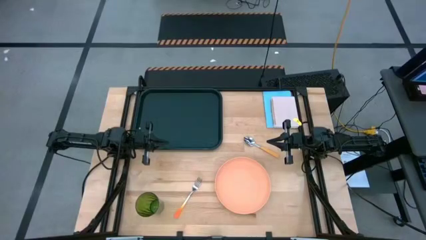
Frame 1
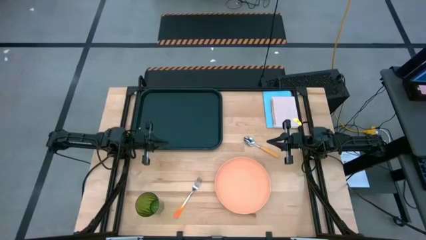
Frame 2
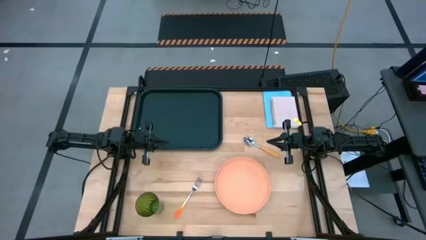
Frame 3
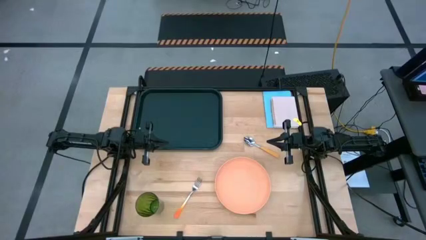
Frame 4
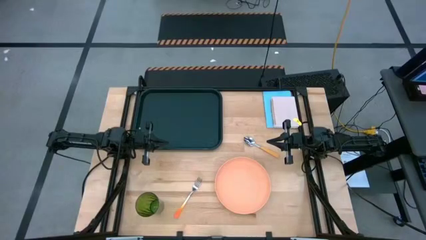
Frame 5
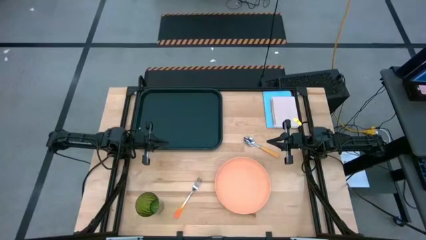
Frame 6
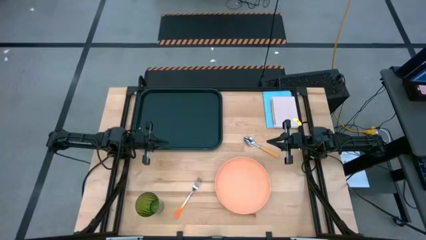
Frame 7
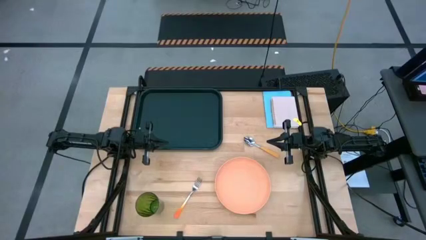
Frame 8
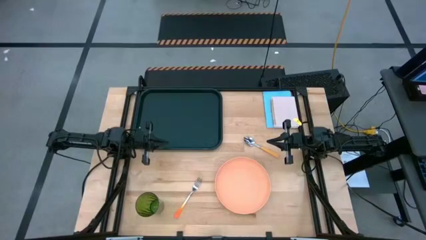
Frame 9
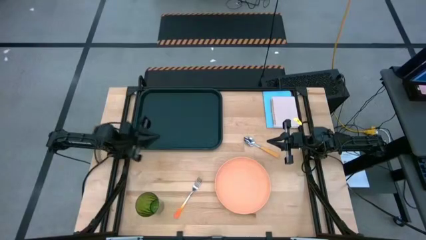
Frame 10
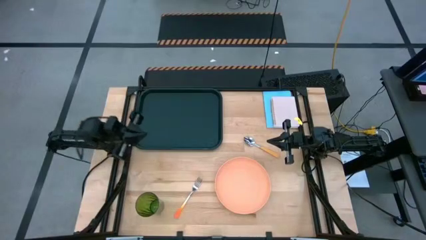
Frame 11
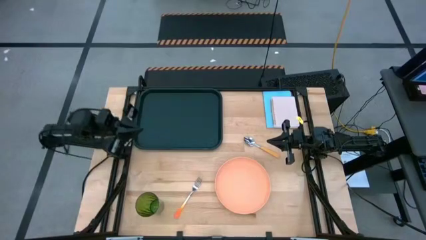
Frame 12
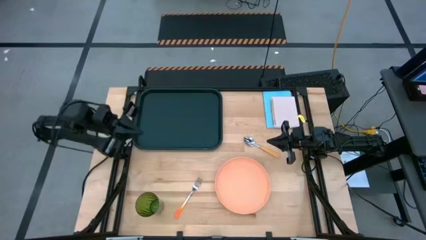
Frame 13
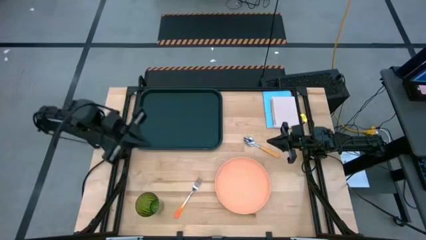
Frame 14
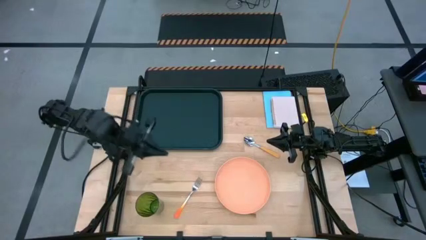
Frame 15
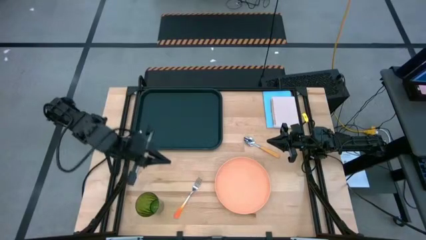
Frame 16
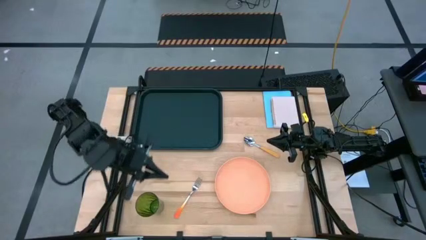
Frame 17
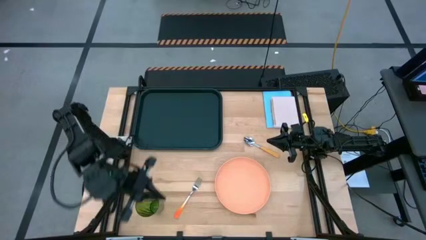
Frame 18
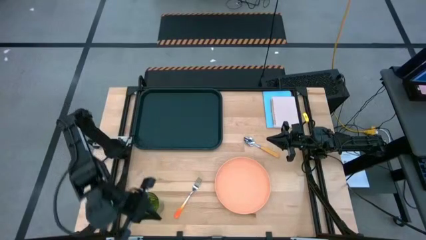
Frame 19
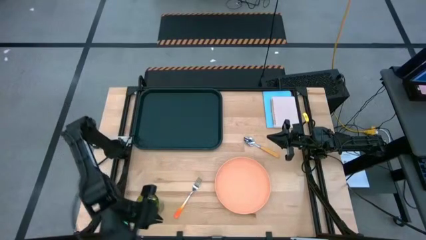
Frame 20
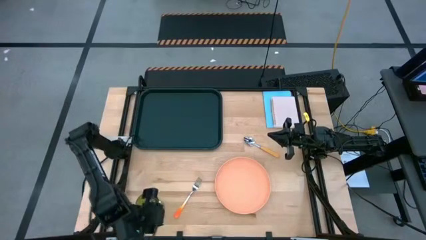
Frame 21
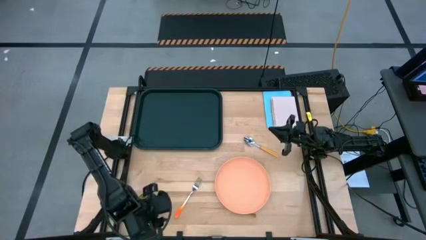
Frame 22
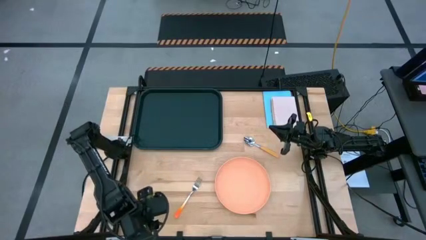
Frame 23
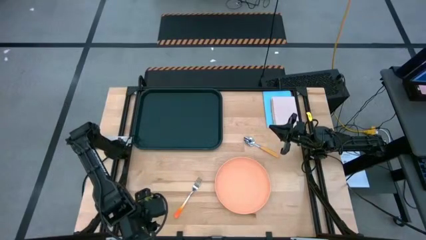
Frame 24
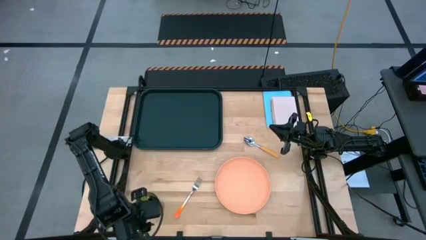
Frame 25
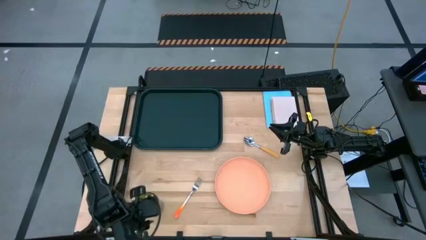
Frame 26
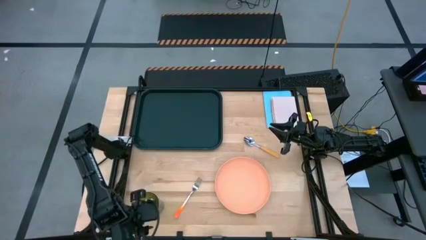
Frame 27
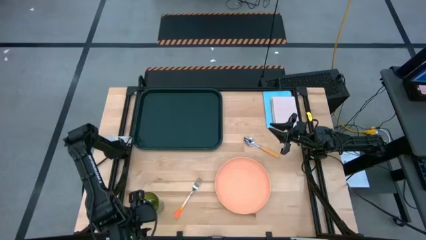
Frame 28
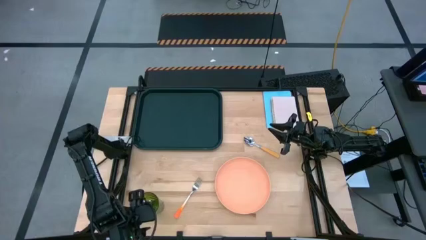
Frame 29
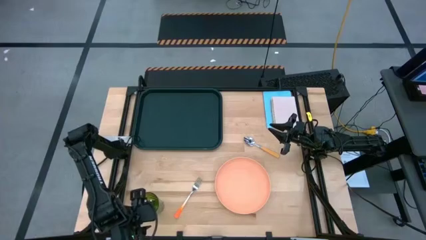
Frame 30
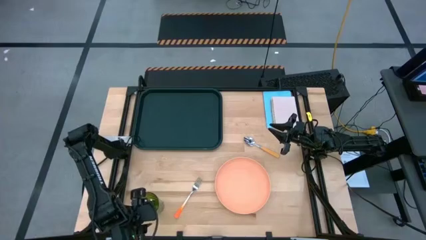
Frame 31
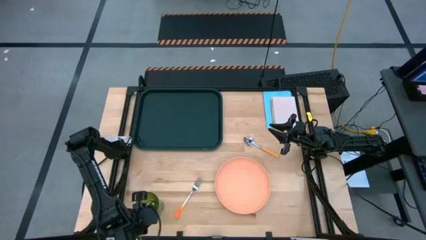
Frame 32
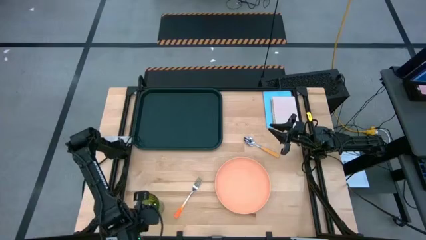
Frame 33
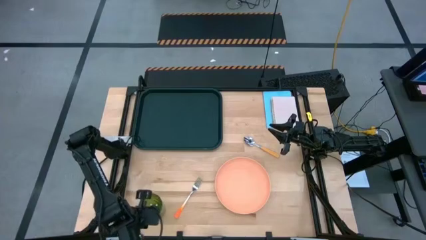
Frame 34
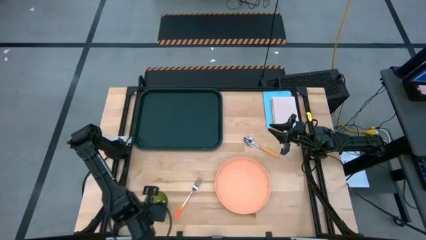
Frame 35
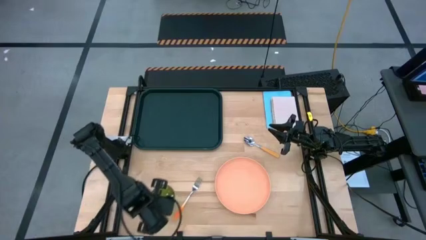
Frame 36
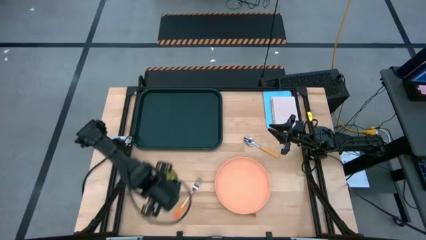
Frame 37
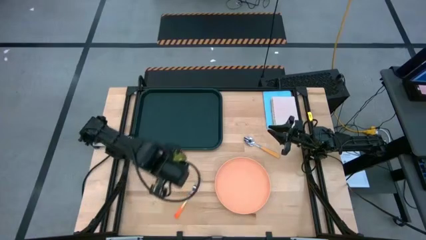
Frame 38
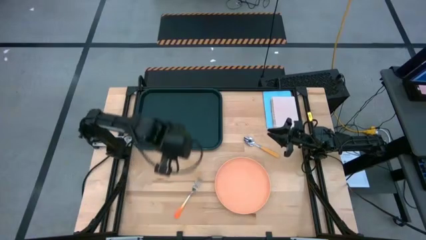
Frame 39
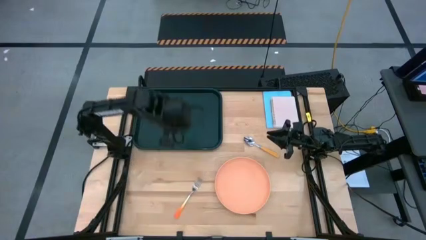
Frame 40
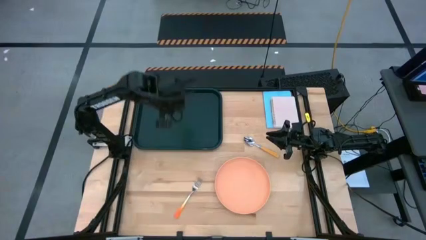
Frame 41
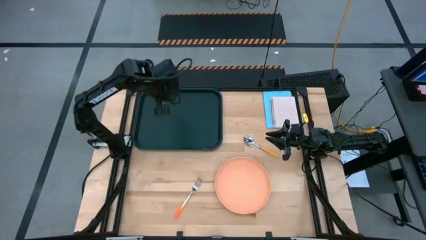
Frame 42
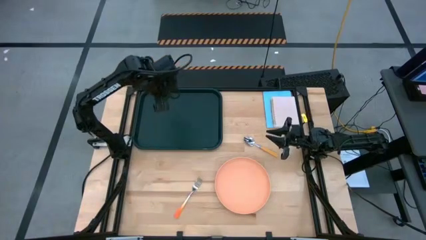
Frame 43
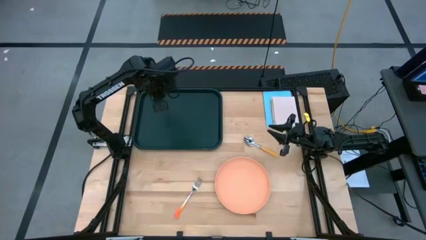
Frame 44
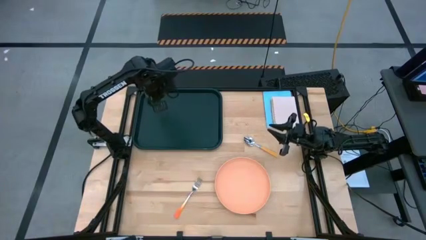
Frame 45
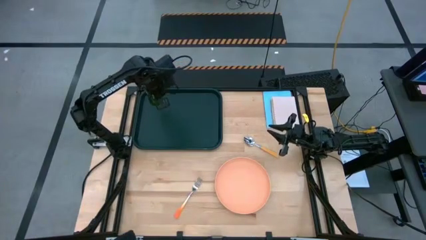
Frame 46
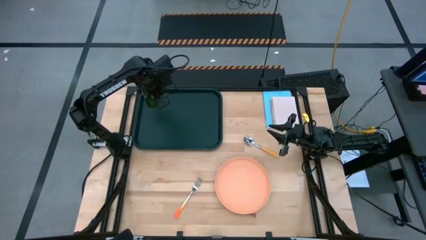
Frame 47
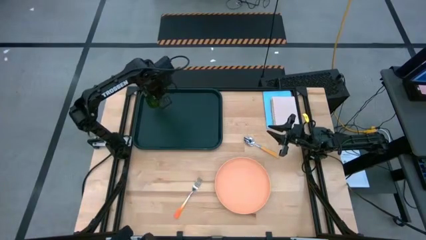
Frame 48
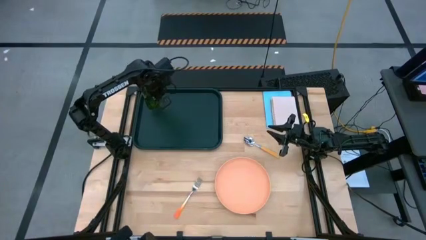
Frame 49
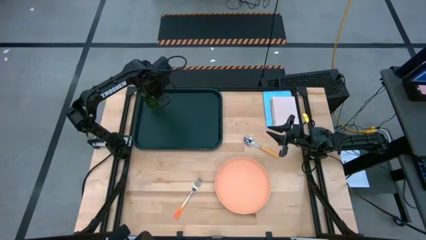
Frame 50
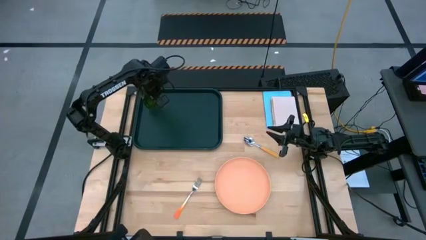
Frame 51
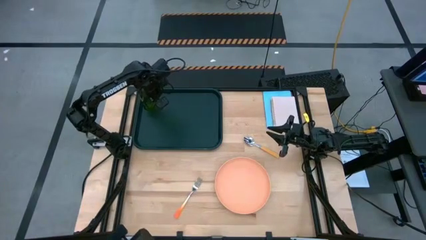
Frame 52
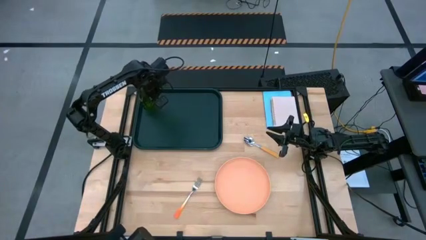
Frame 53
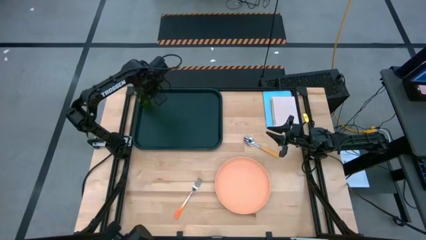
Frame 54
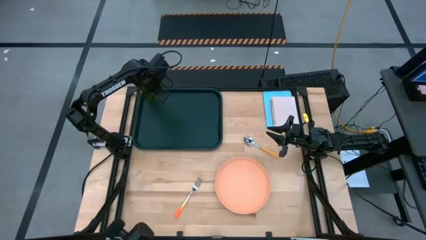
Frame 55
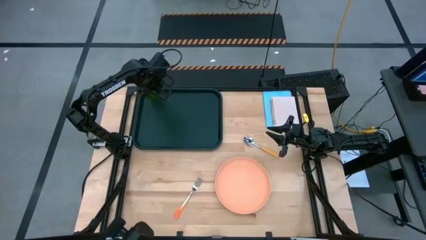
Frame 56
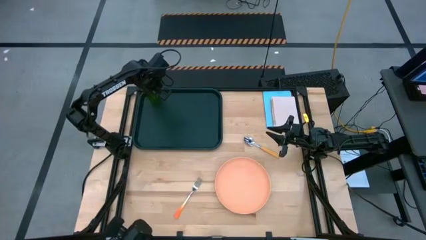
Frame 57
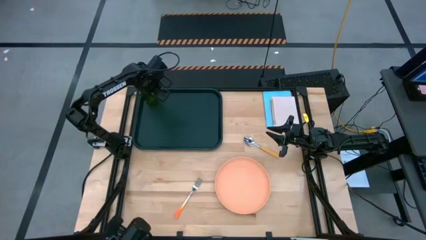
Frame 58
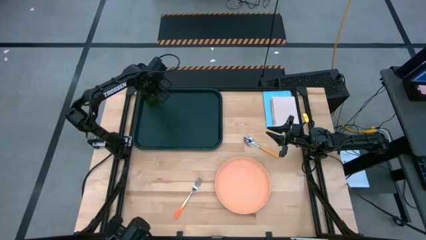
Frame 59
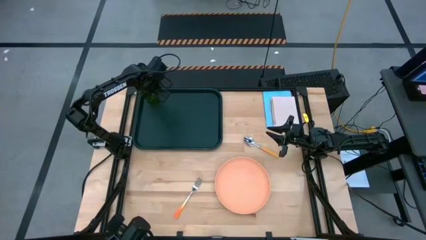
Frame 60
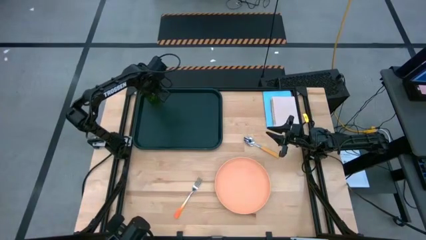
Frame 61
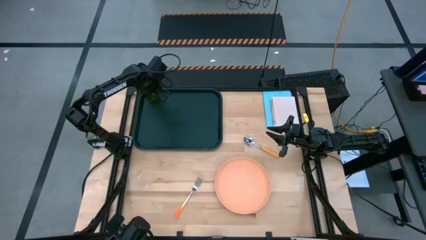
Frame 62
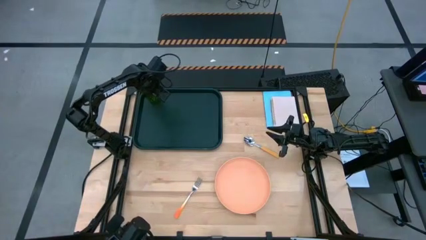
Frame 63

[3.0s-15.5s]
Task: Pick and place plate/cup/fork/spoon on tray
Put the green cup on the black table tray
